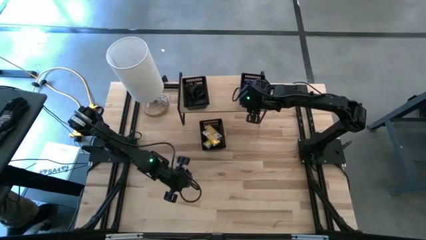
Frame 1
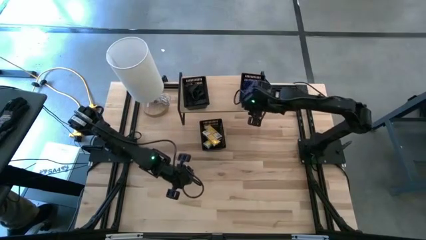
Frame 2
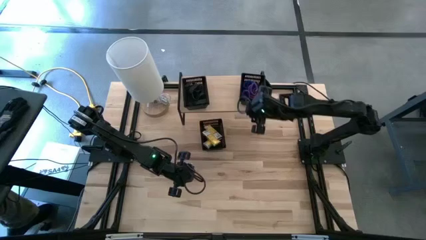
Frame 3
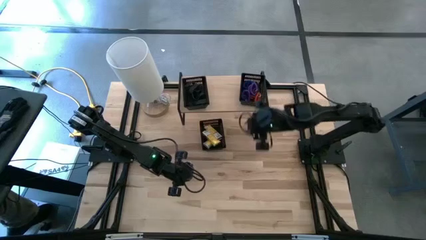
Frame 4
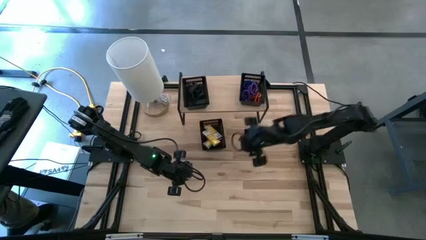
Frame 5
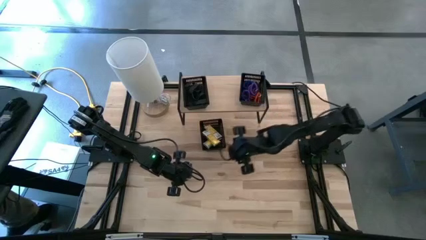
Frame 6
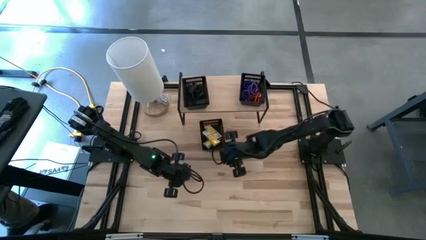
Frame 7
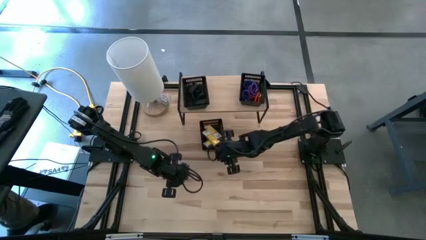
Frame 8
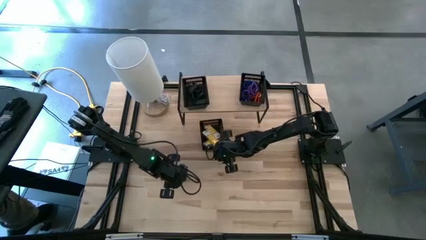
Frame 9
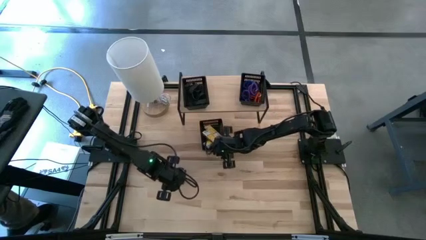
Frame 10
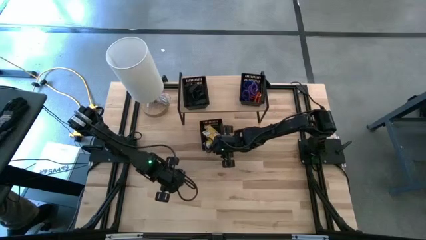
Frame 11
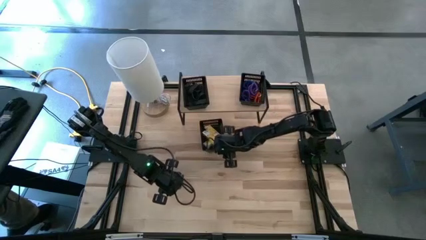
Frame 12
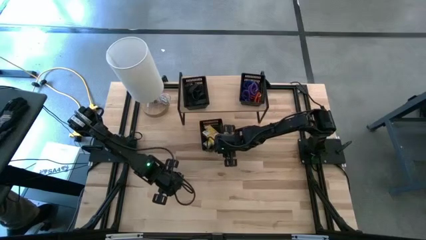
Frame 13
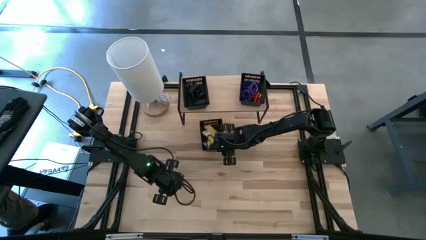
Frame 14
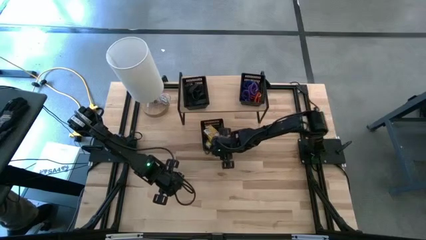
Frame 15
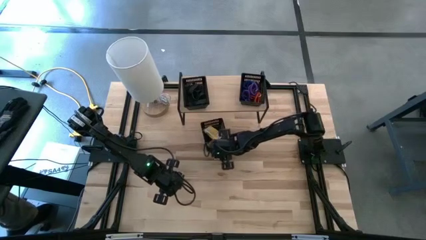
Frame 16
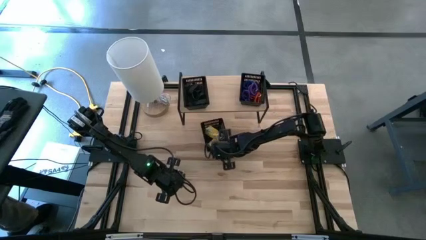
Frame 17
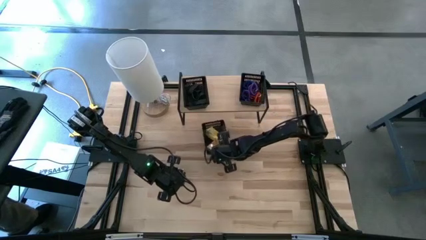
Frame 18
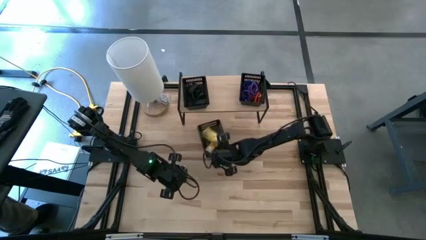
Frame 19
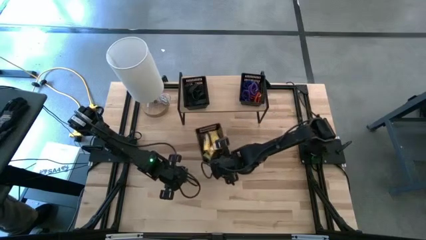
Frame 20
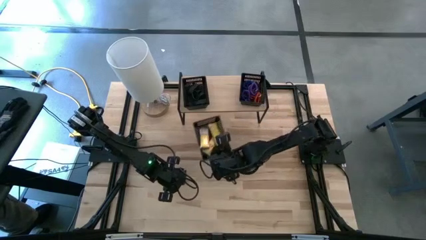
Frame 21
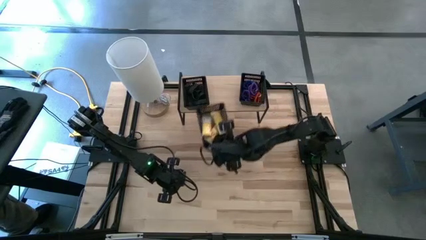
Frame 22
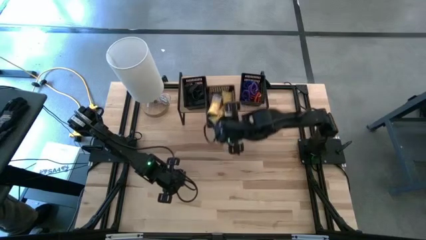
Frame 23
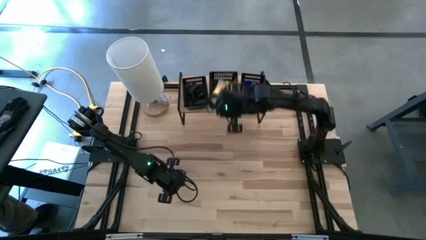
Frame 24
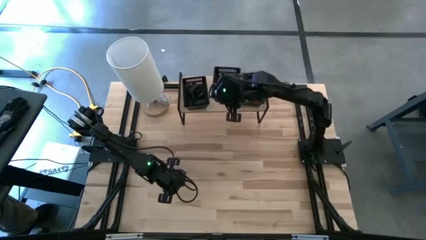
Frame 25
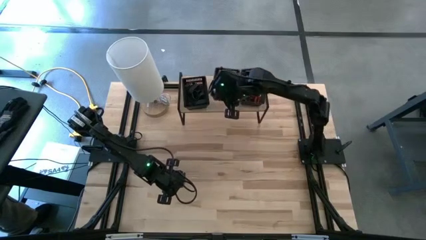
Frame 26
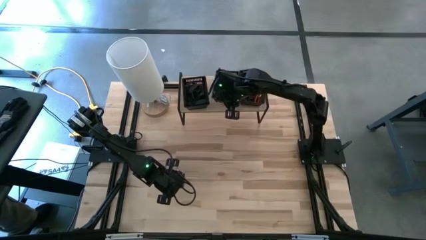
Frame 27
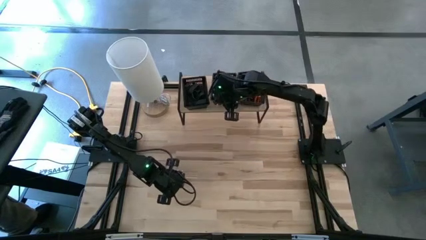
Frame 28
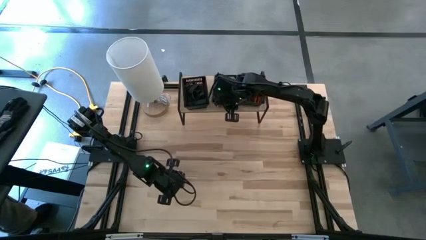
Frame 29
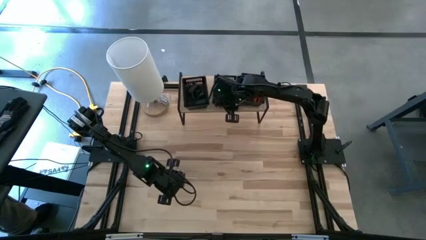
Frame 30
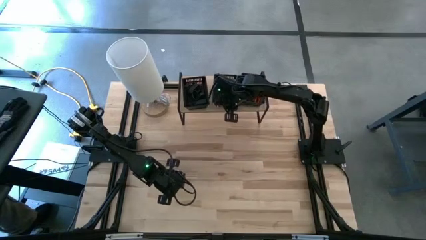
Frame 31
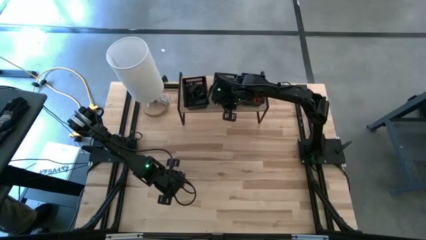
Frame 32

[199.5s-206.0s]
Task: Pick & Place Office Desk Supplies
Put the black bin on the shelf

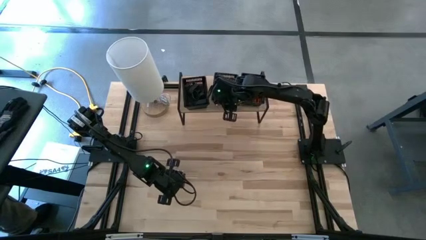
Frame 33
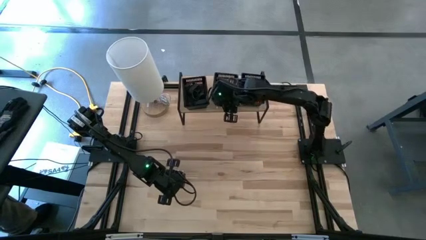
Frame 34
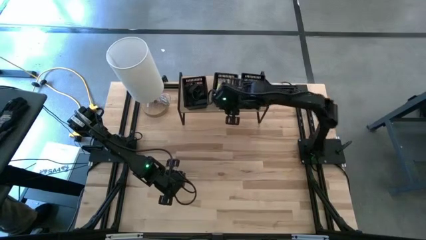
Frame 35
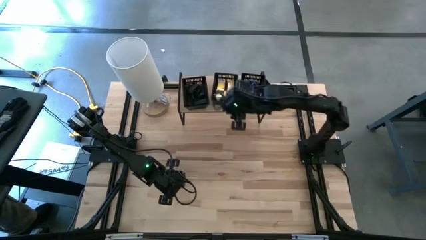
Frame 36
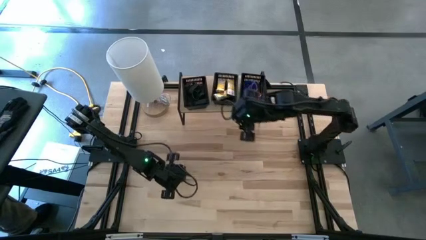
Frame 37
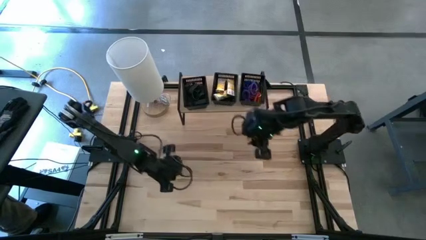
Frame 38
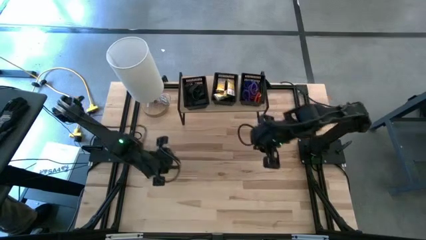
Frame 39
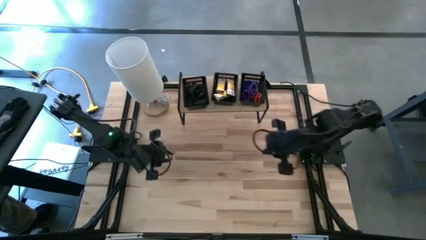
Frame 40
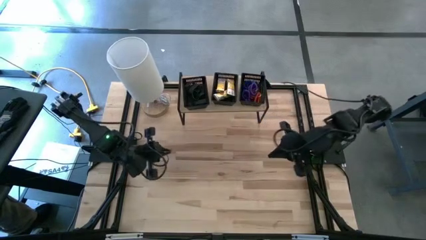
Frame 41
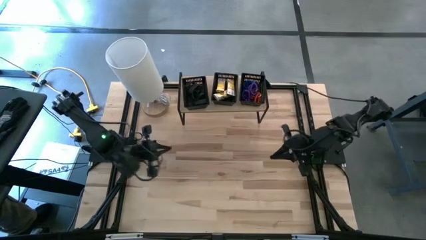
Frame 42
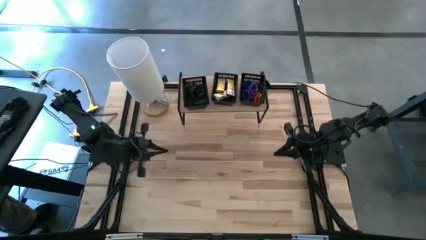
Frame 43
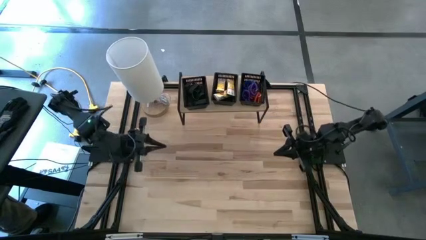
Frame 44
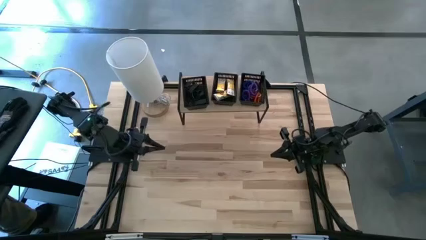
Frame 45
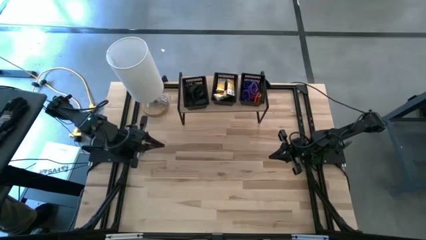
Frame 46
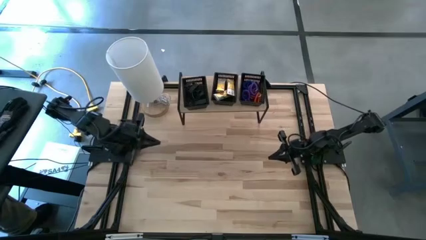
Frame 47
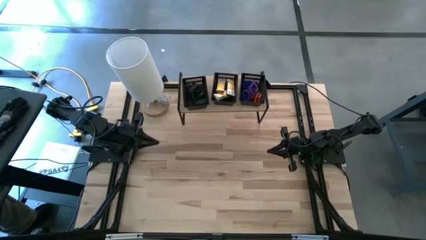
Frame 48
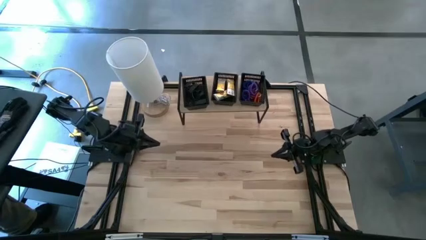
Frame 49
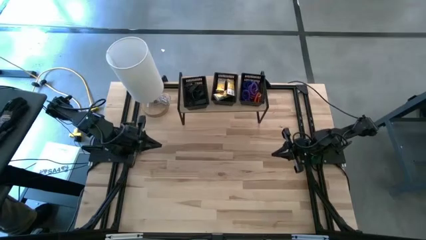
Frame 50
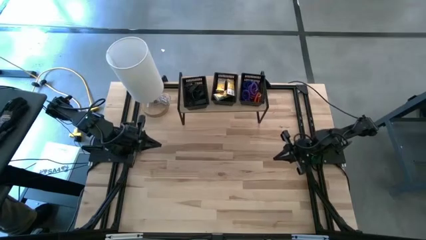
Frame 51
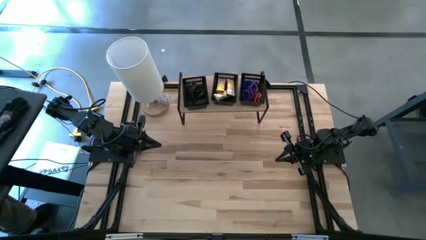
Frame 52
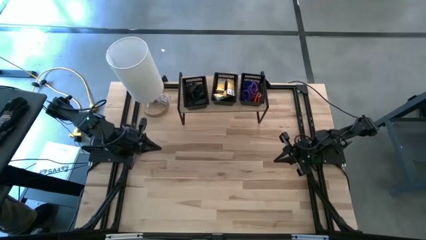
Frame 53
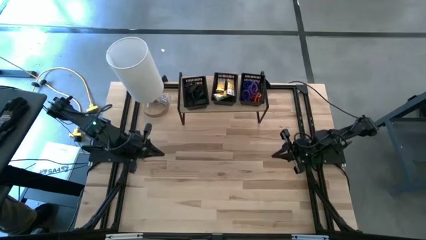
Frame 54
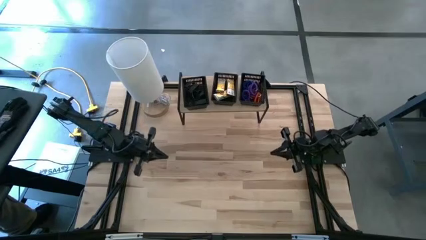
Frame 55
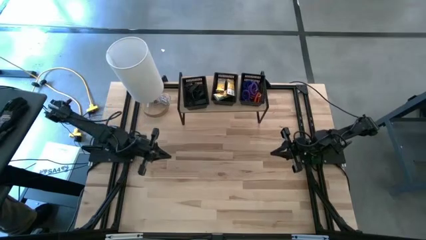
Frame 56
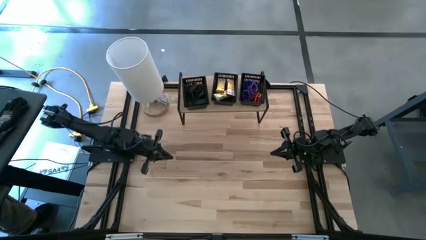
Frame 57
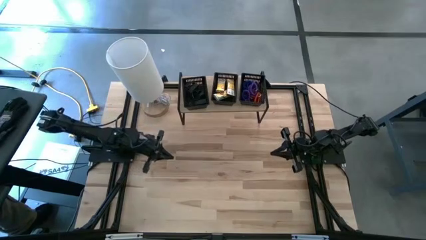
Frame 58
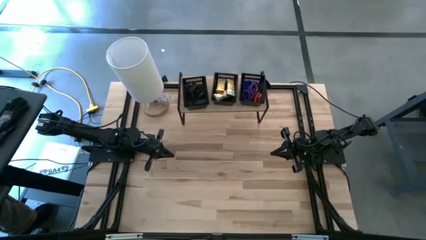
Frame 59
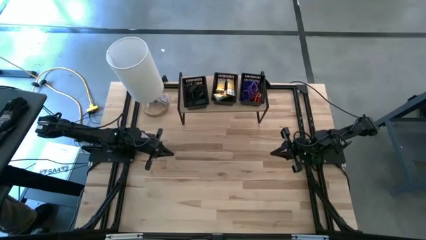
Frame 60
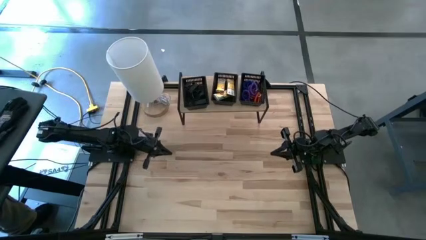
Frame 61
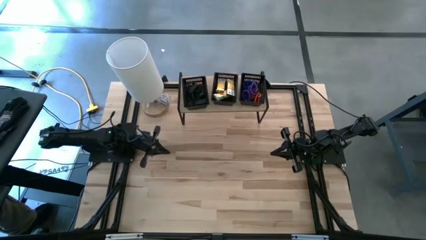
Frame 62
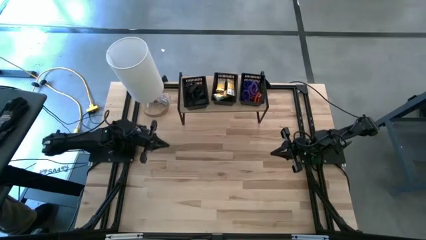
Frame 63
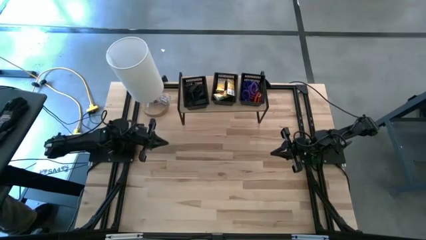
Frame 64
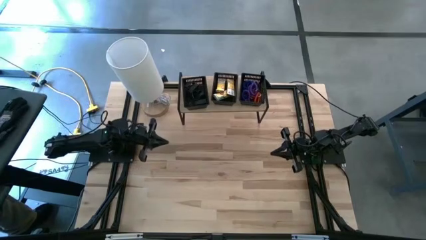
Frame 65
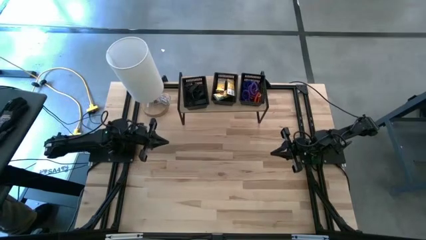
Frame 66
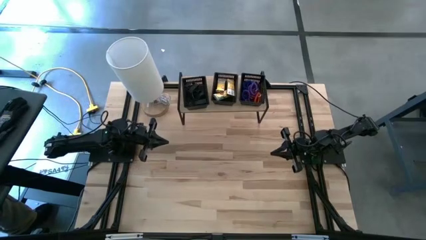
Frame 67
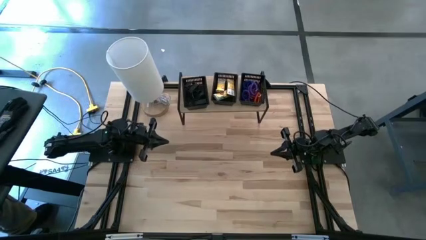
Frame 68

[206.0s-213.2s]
Return to Home Position

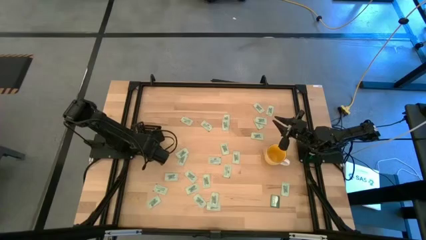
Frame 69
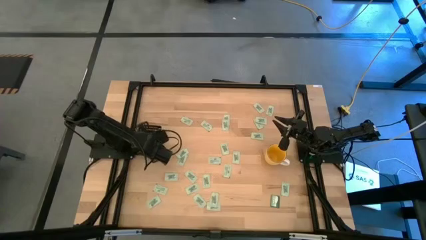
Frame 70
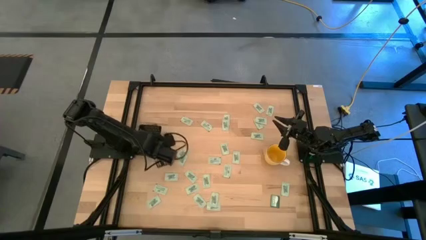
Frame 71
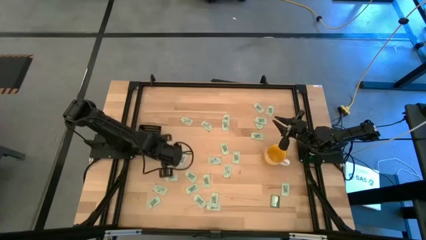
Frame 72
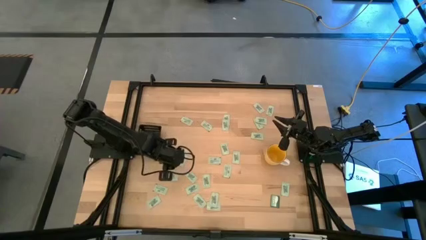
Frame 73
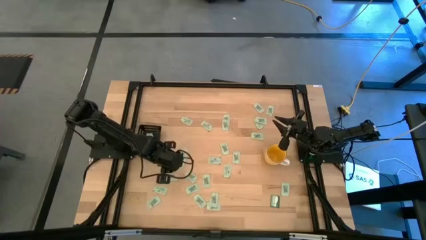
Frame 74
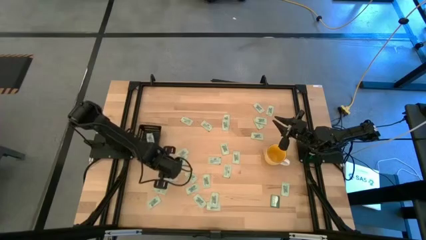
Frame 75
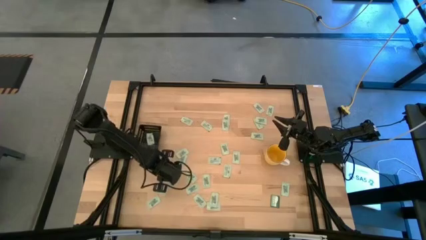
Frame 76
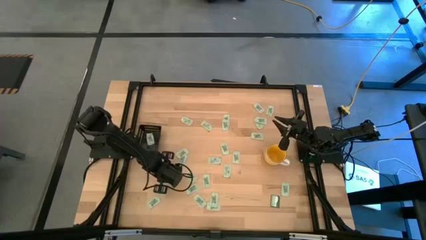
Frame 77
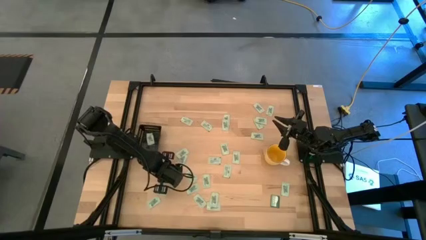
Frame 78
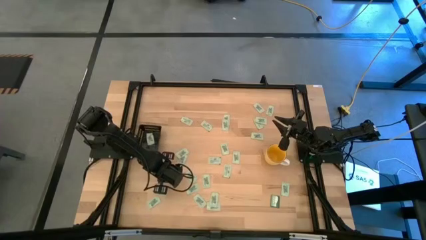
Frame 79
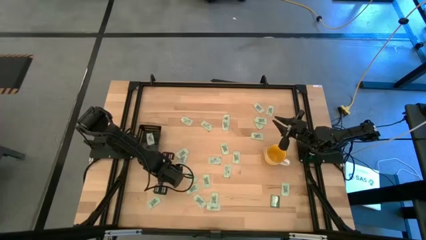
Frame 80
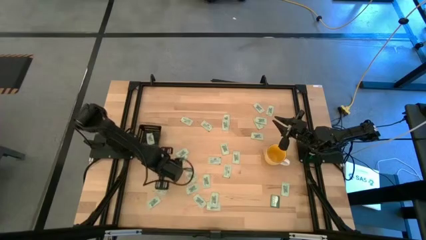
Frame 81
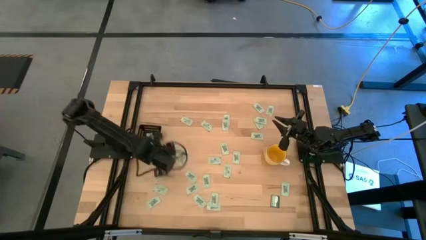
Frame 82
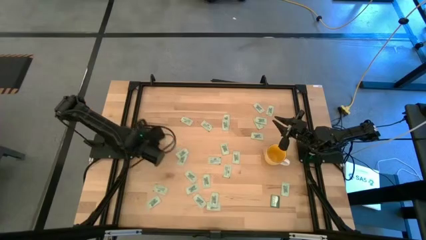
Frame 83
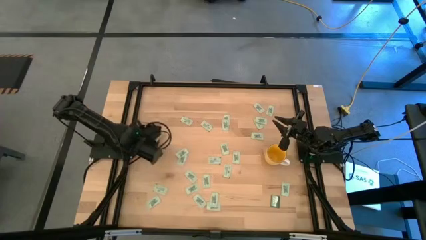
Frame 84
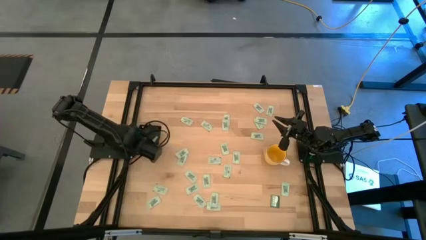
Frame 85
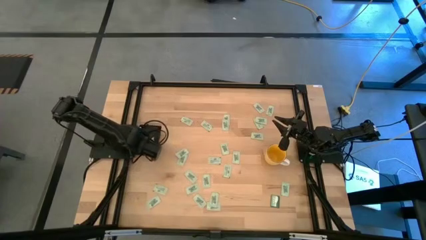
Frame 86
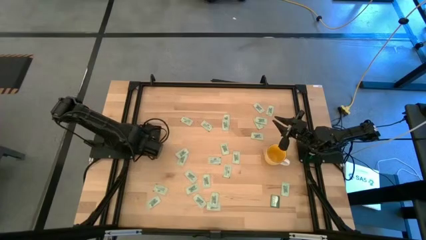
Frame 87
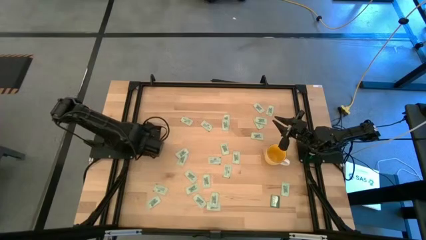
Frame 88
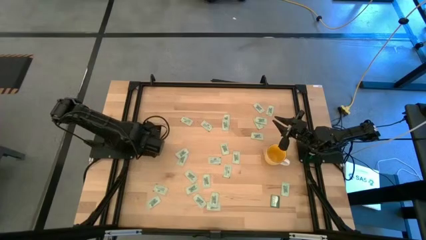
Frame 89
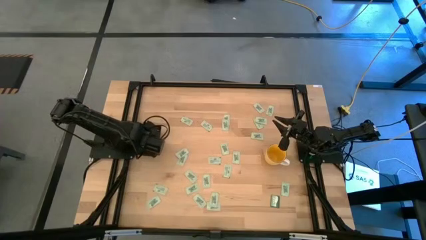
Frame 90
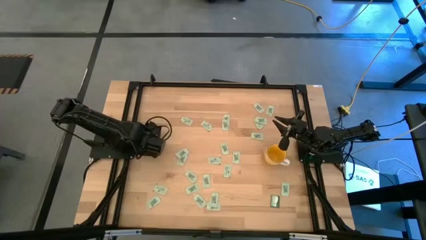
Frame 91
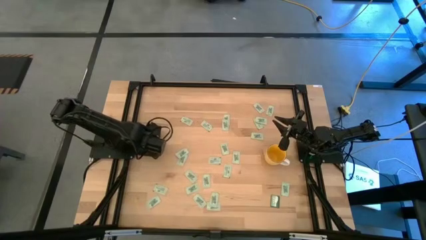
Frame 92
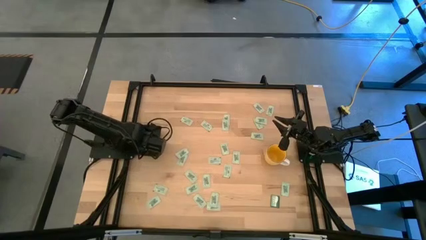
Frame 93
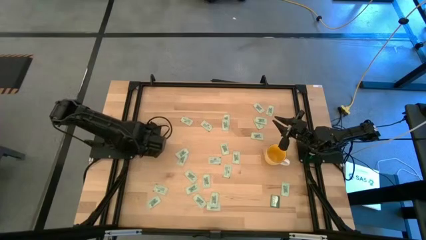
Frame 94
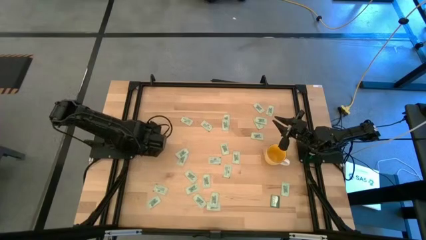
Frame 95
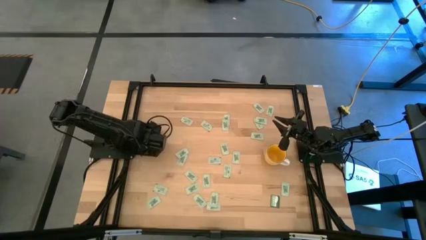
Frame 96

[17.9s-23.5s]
Task: Pick and place Stevia / Truvia into bins
Put the stevia packet into the black bin
